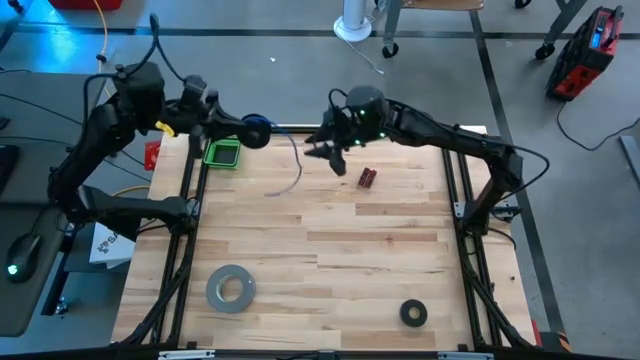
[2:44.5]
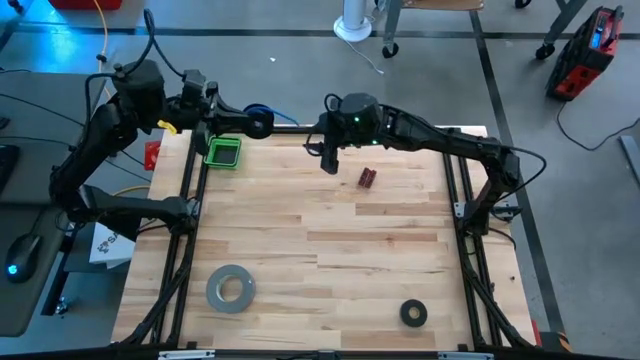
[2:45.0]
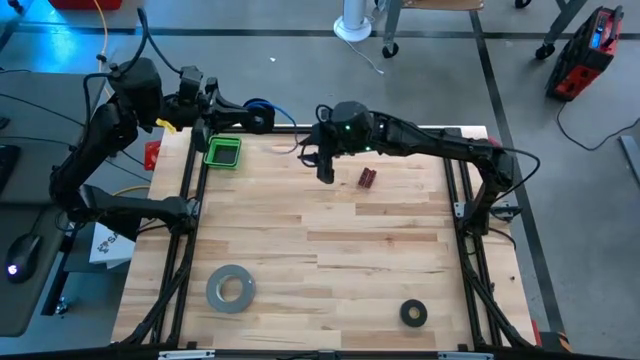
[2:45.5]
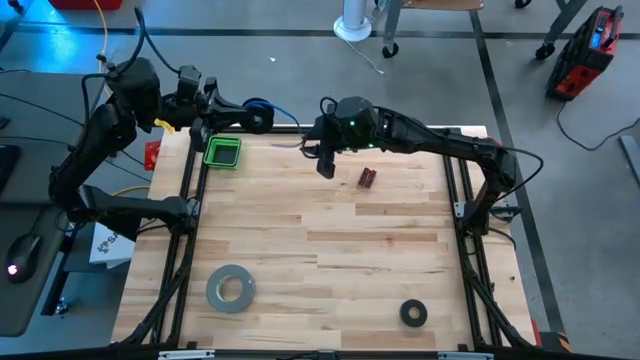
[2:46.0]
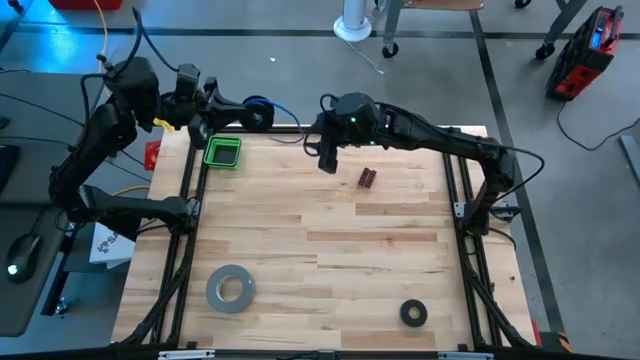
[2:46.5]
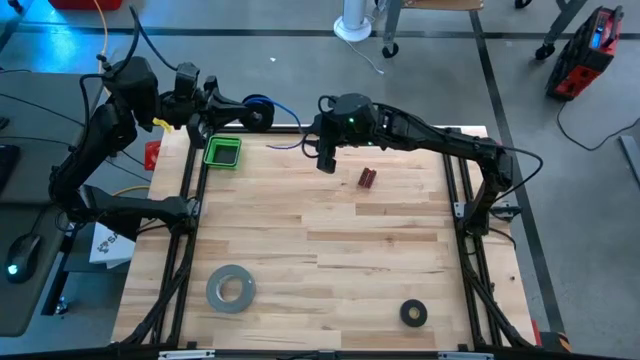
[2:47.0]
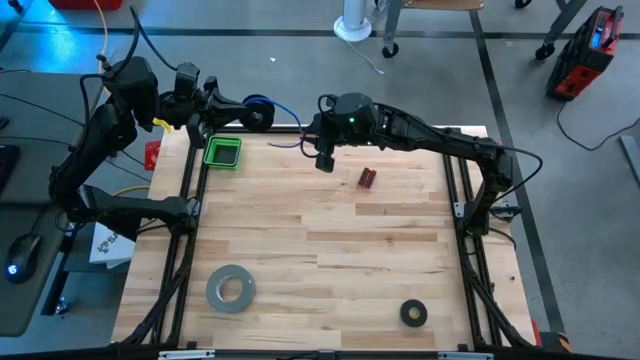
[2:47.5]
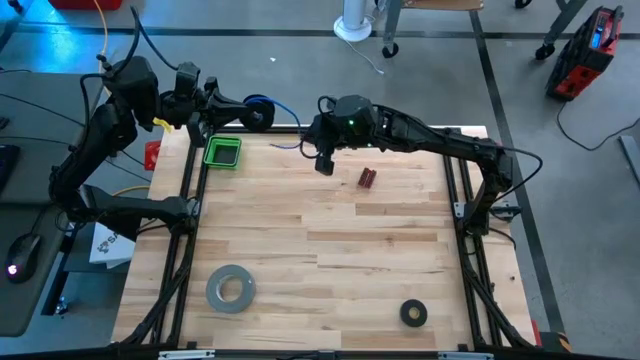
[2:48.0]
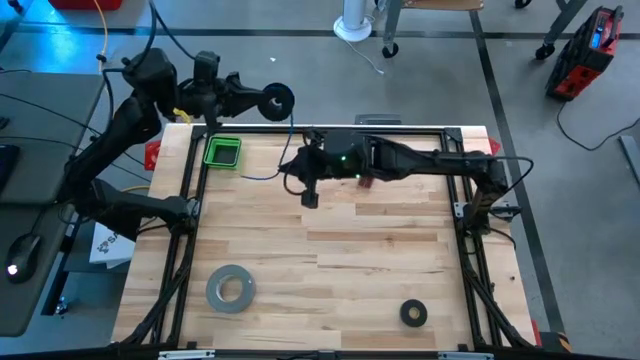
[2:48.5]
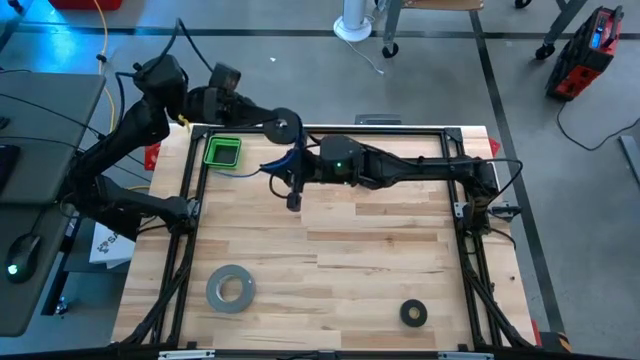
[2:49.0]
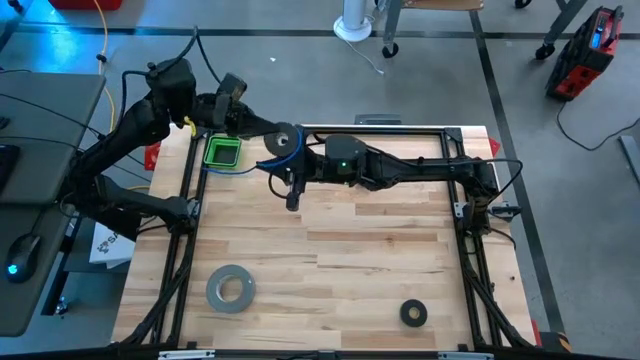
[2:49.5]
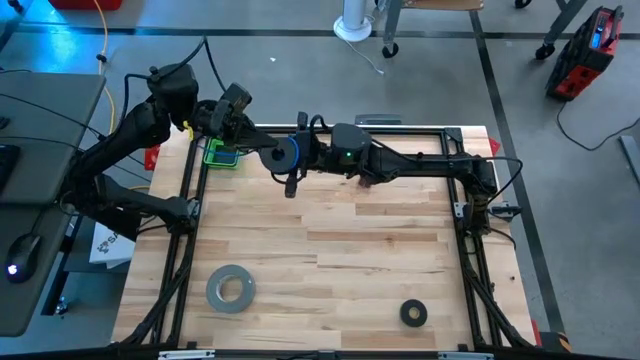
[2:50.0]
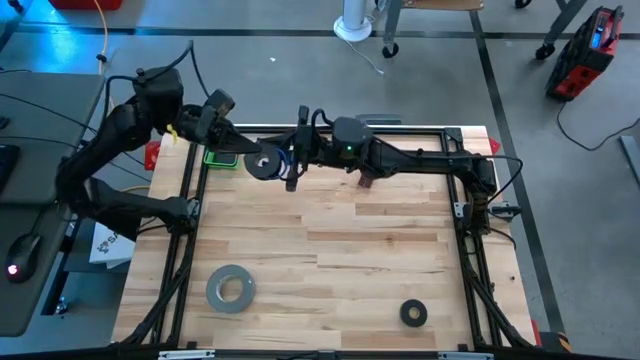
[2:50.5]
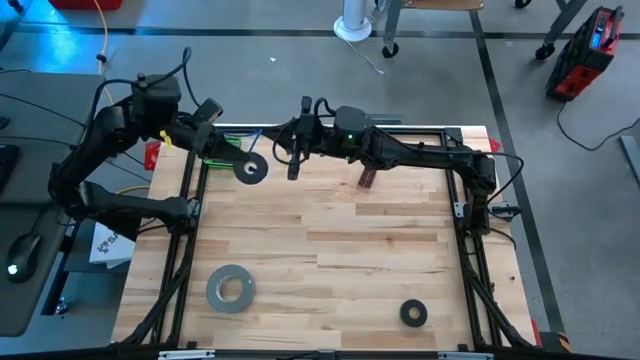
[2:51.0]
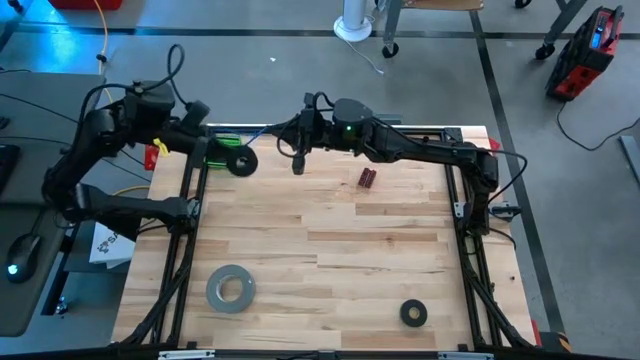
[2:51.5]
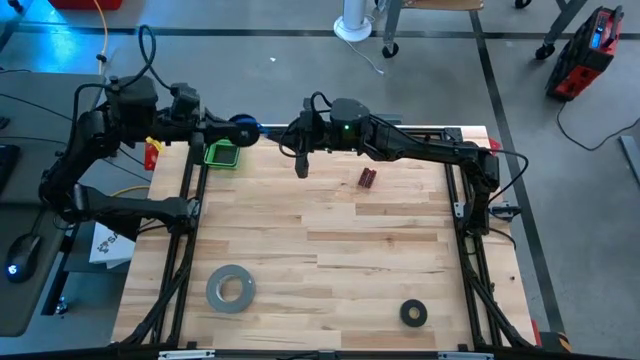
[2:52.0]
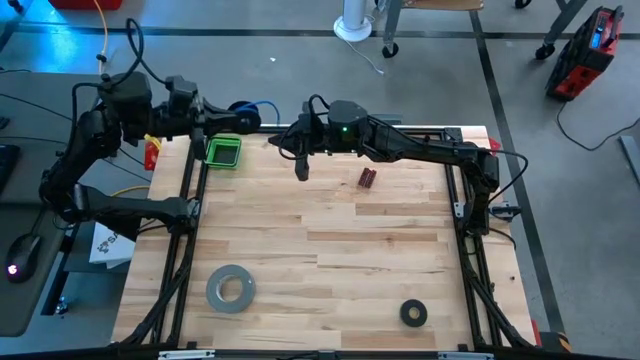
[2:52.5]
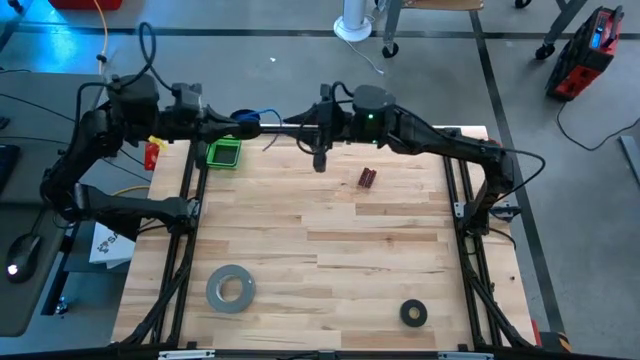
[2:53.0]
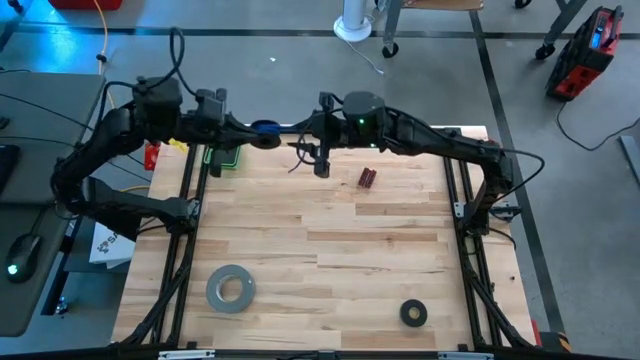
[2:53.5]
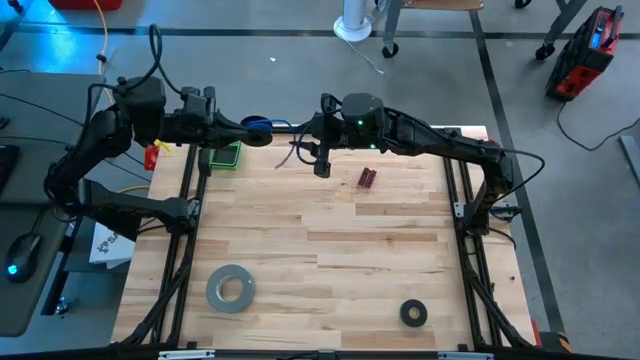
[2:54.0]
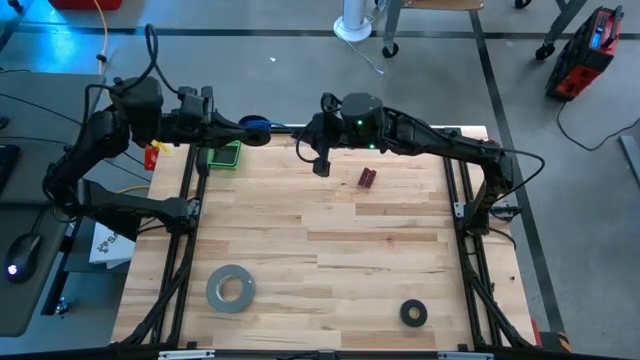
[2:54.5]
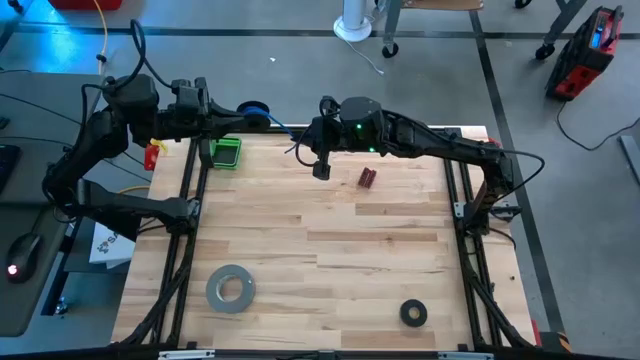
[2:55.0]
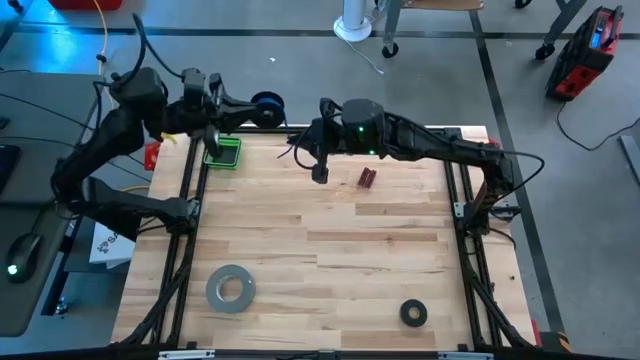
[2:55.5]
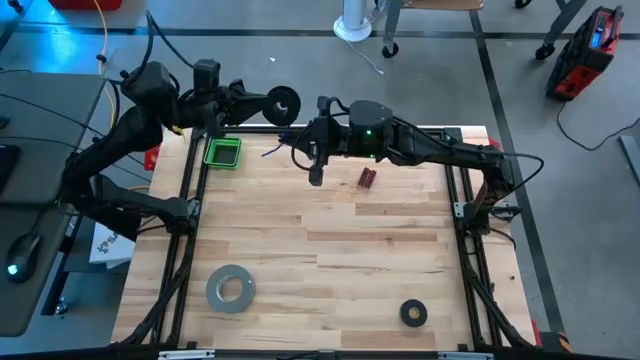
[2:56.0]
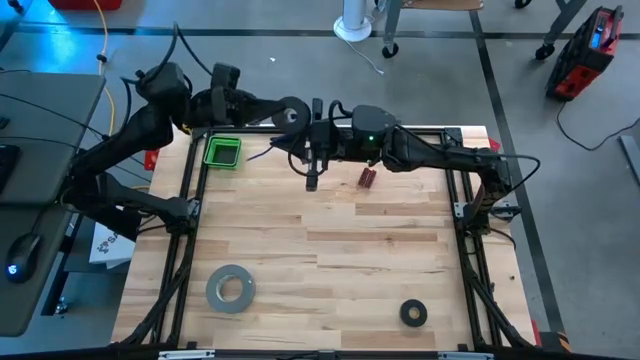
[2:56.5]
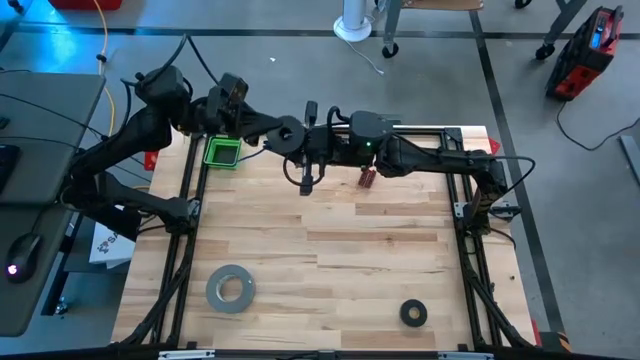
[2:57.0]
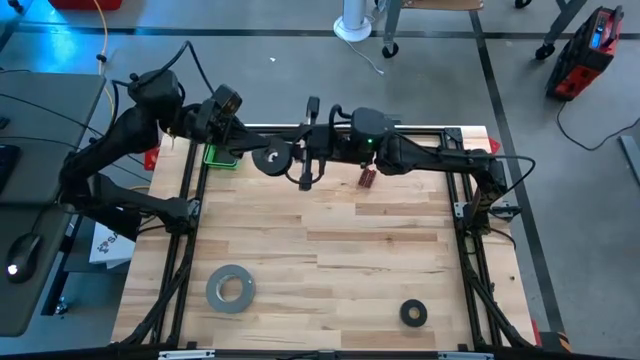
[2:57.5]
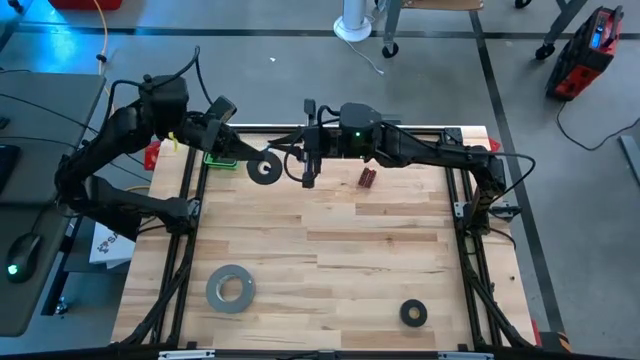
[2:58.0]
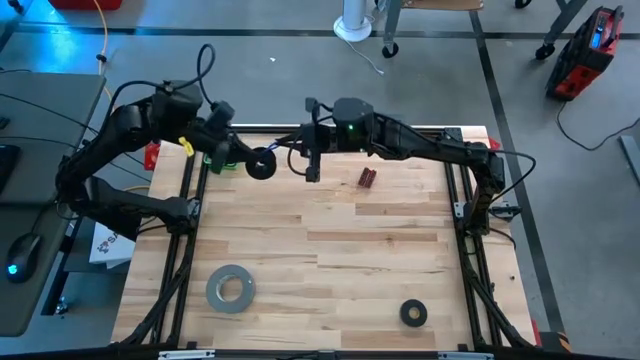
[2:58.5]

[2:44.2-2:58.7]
Task: Coil cords
Coil the blue wire onto the spool

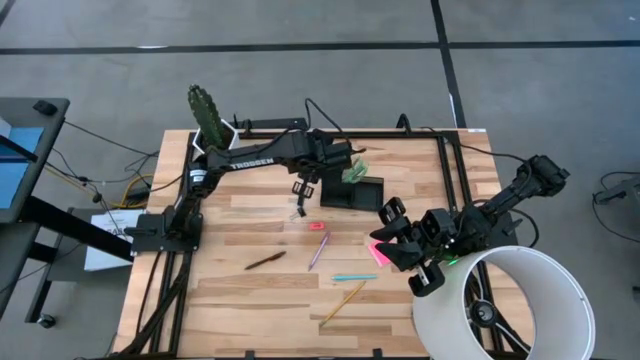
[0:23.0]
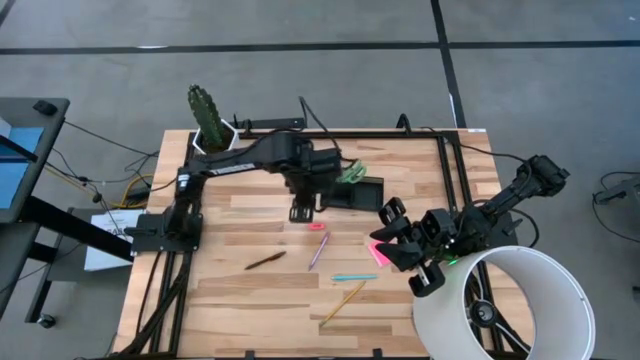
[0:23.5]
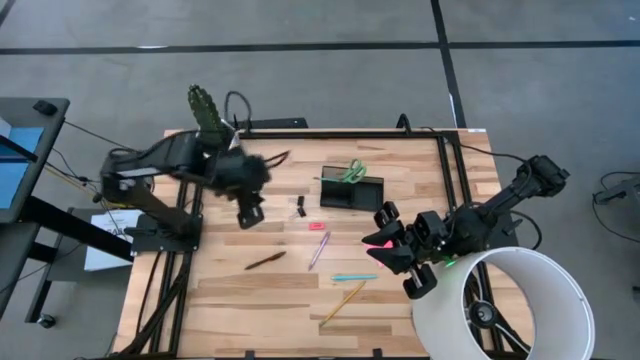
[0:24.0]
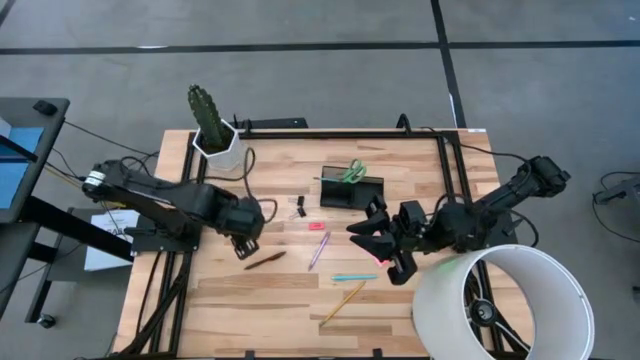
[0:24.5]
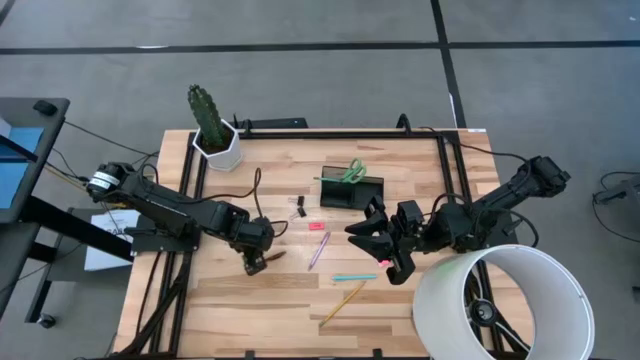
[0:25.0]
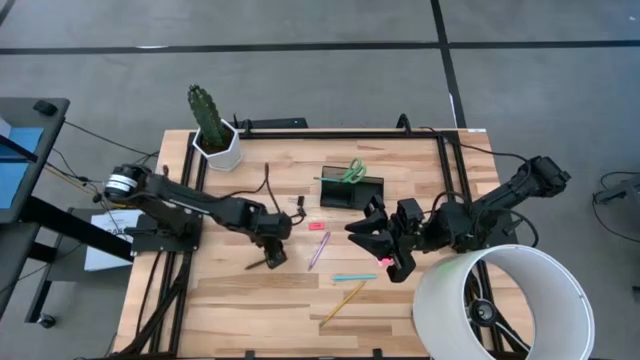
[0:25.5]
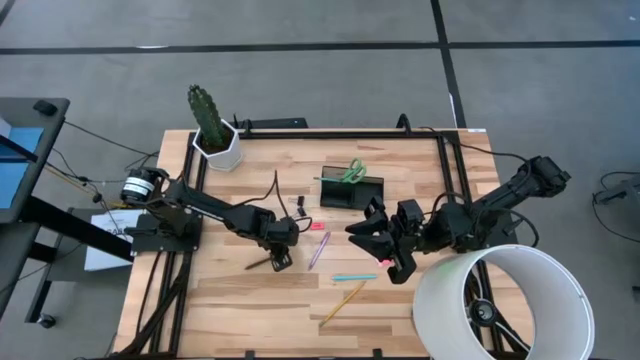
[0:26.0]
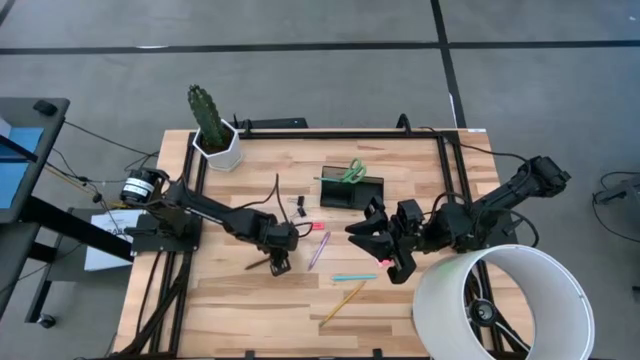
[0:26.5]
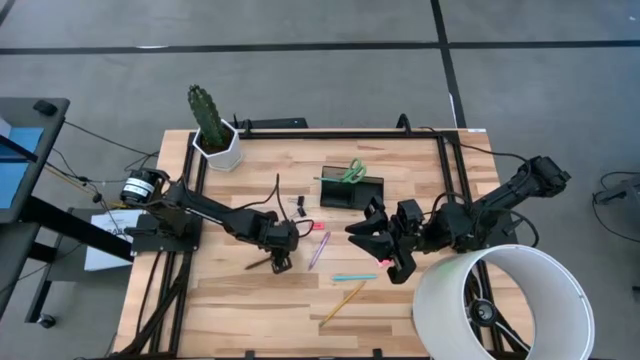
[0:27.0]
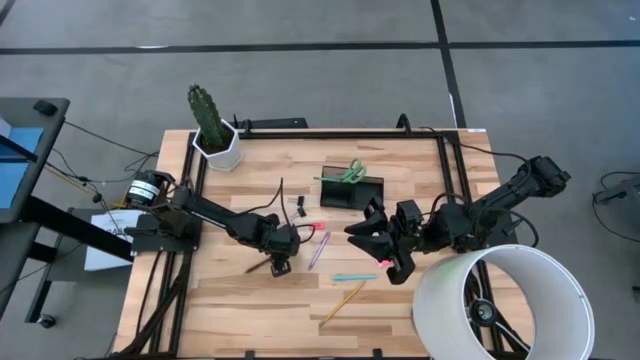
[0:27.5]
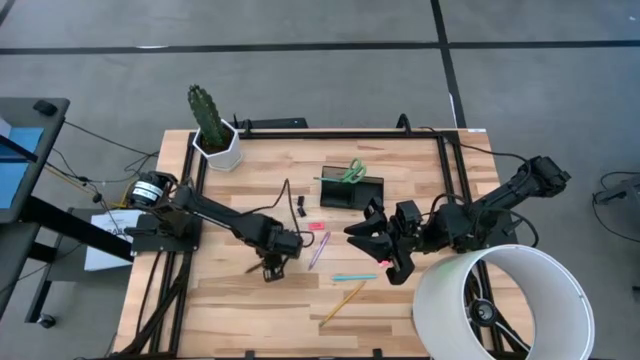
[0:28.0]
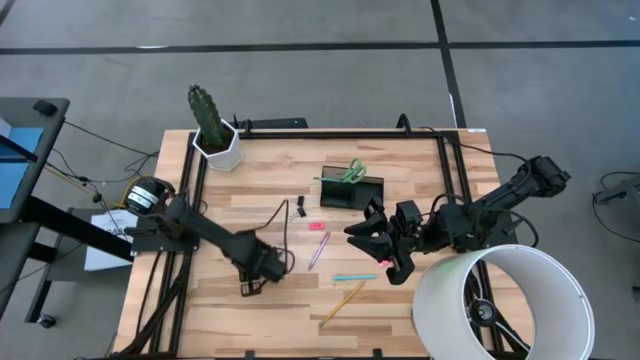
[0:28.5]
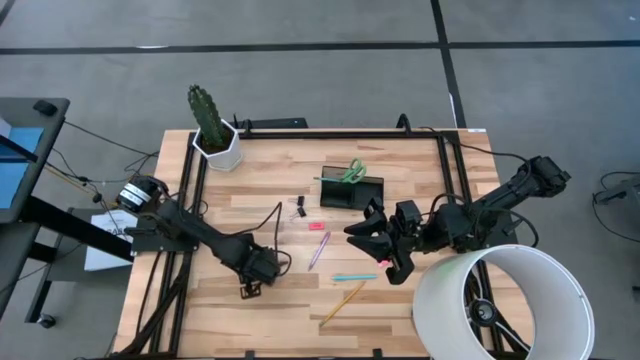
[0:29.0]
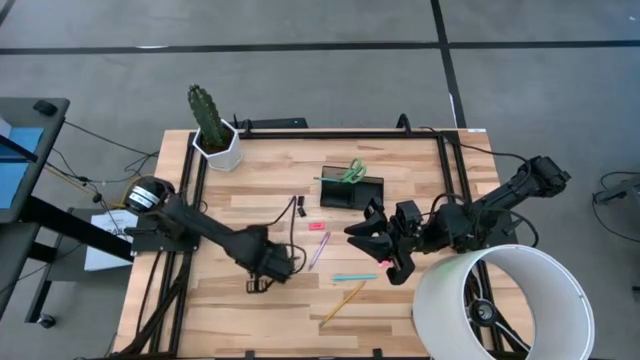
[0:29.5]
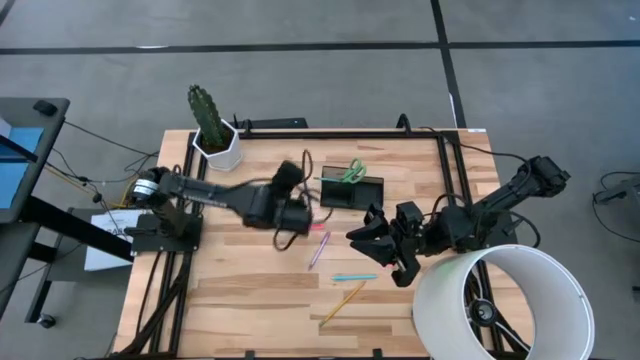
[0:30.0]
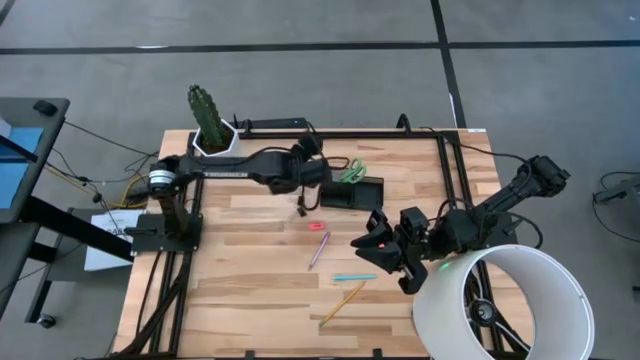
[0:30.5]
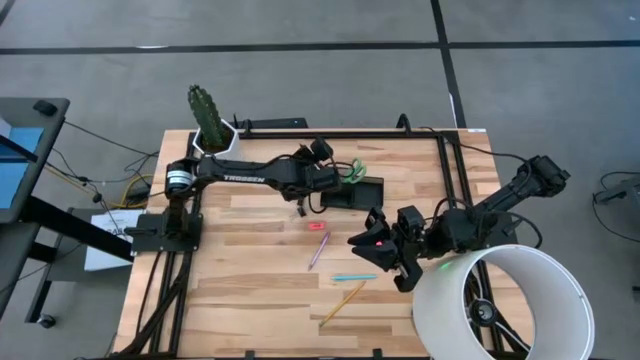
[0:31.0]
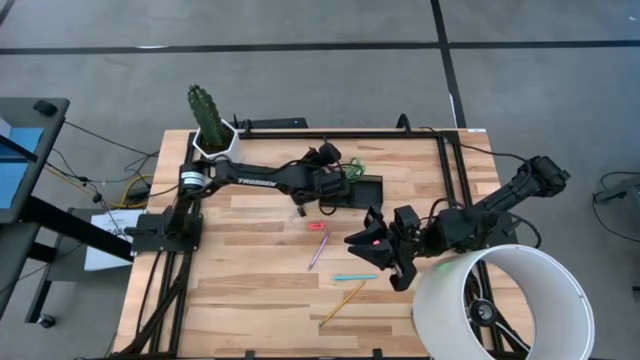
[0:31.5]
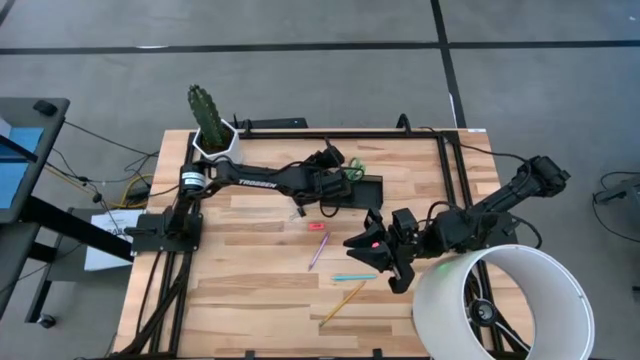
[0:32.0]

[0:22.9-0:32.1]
Task: Pick and place office supplies into organizer
Put the brown pen into the black desk organizer
